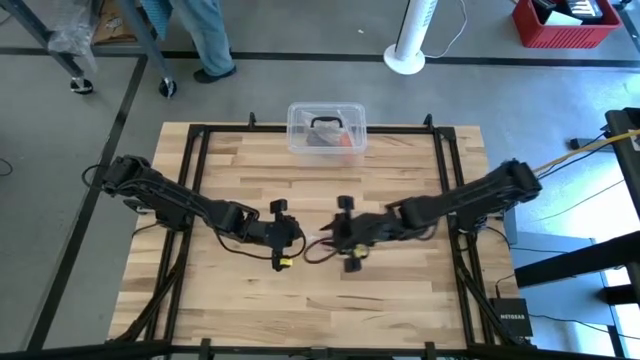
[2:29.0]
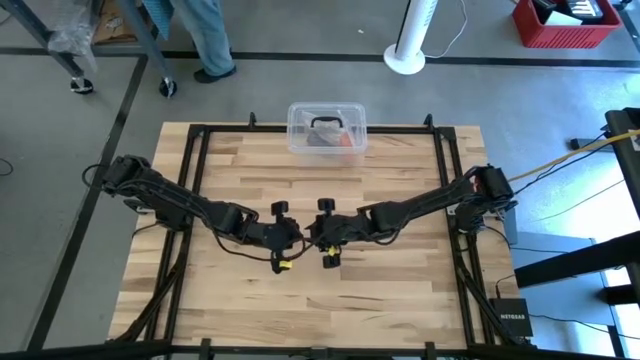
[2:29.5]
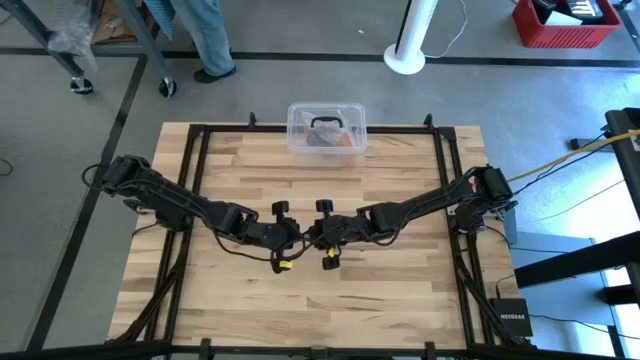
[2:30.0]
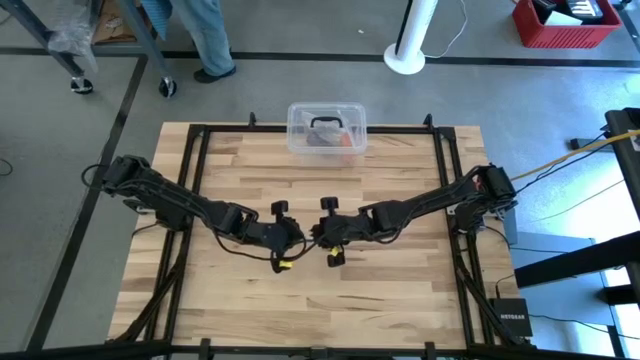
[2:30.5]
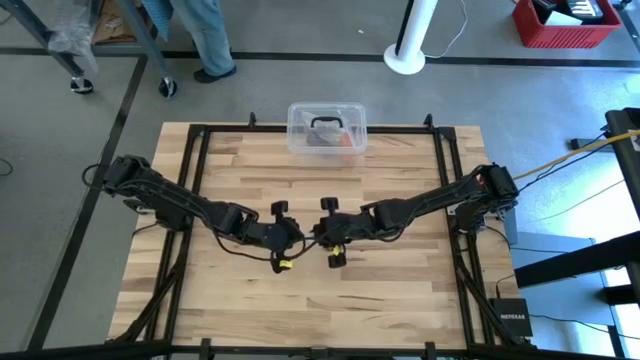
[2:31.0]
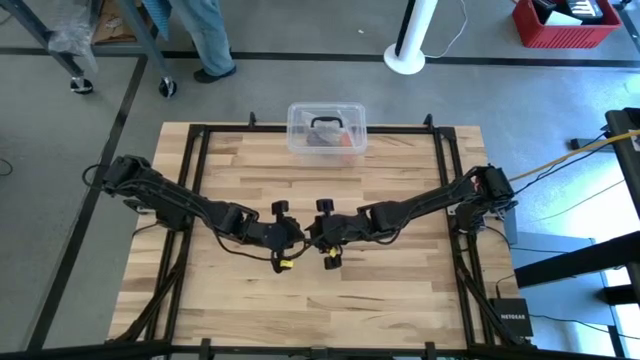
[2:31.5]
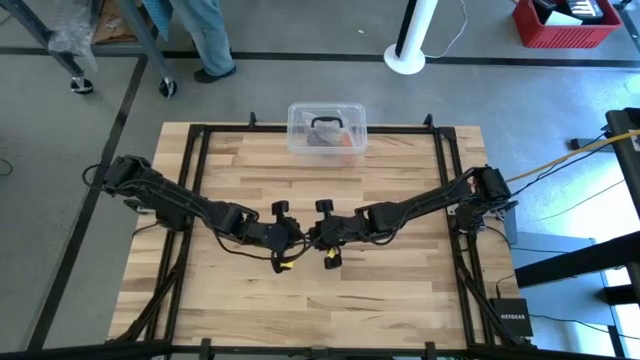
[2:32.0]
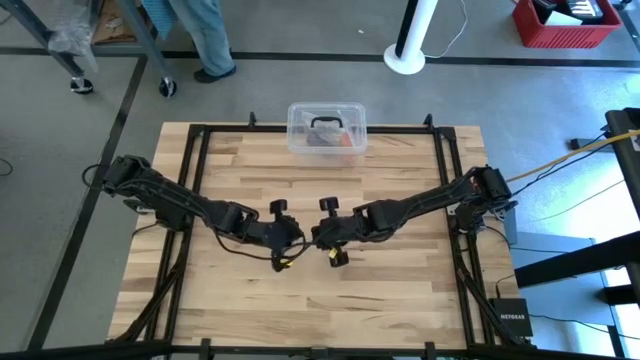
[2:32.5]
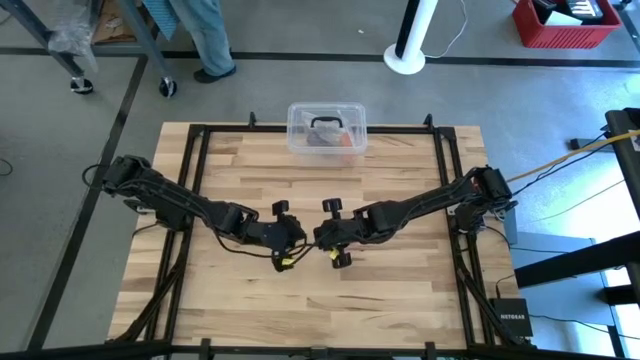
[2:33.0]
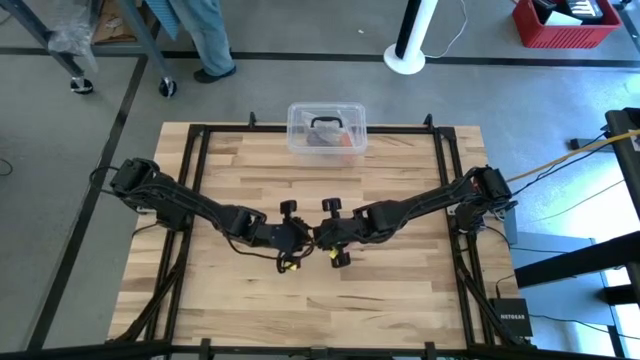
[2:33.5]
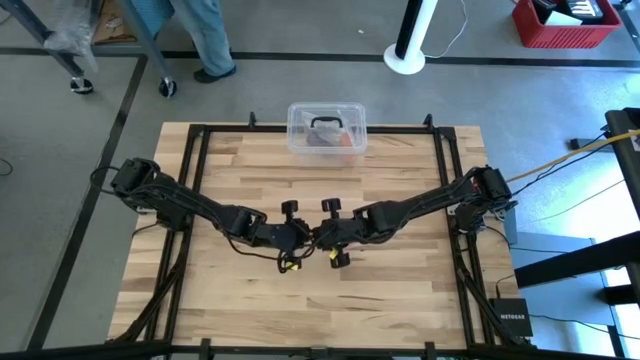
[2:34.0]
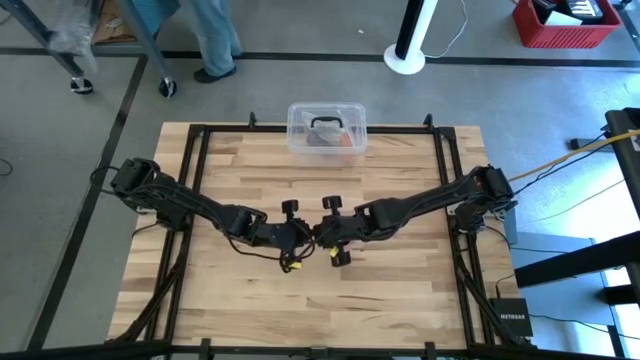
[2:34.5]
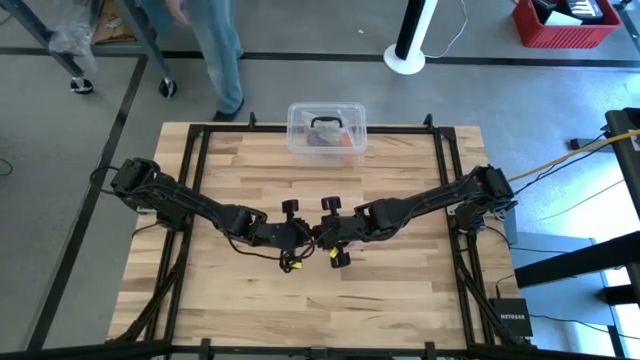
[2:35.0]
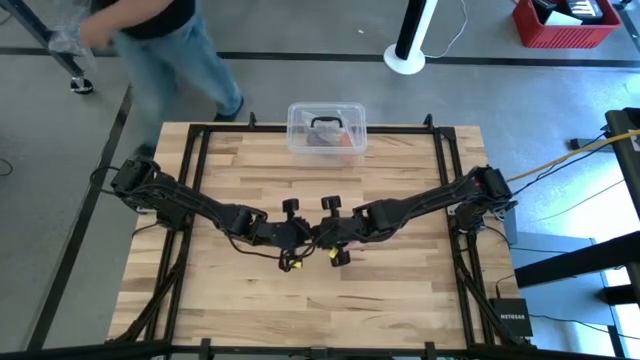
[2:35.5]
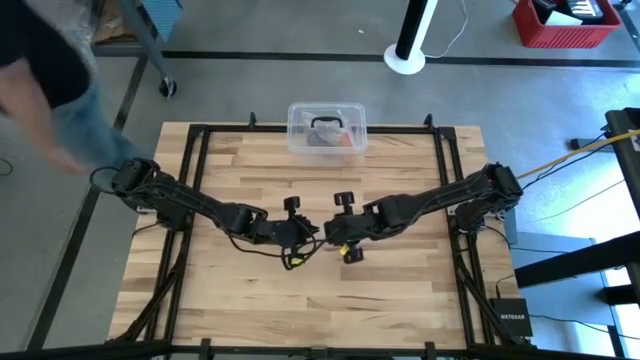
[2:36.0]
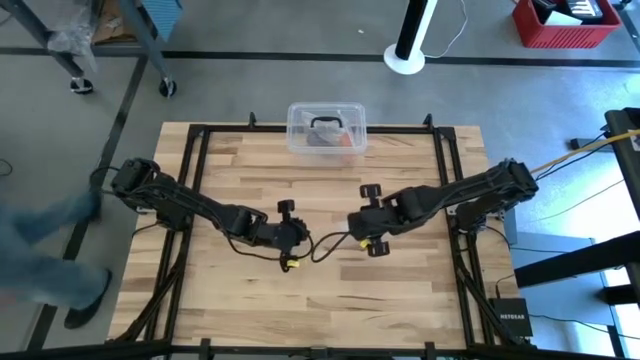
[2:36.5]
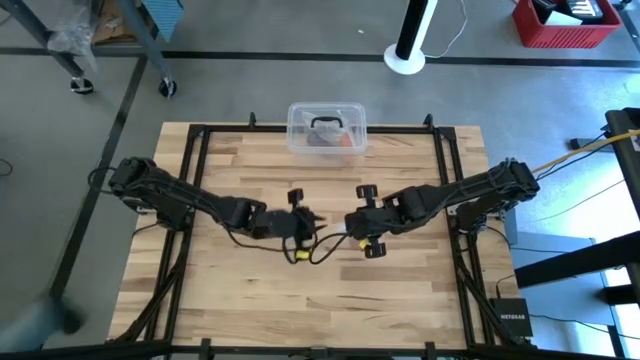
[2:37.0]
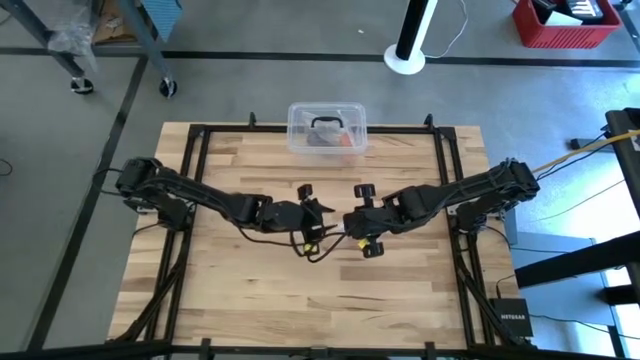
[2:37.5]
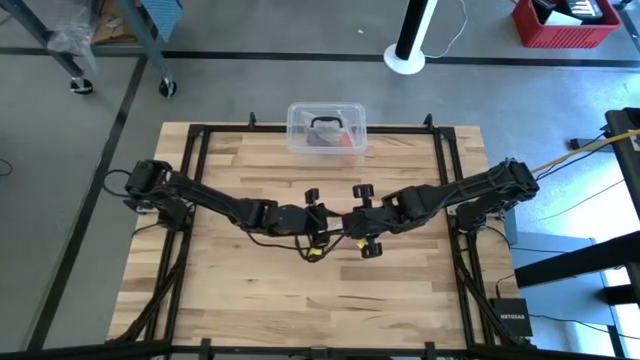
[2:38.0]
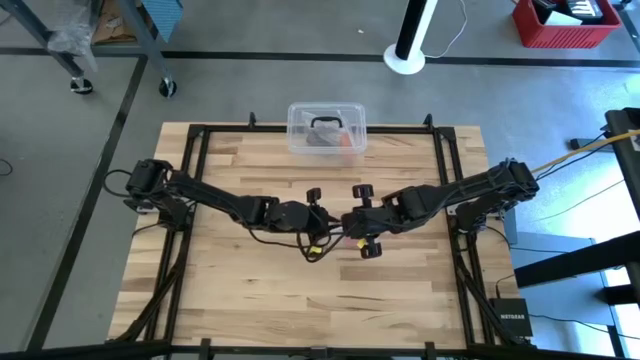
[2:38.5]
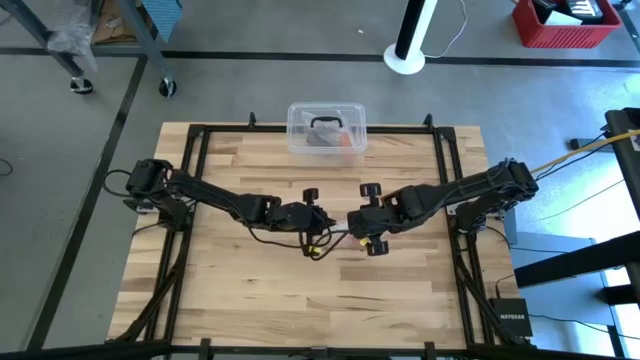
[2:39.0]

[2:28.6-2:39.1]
Task: Roll bandage
Close the transparent zip lock bag

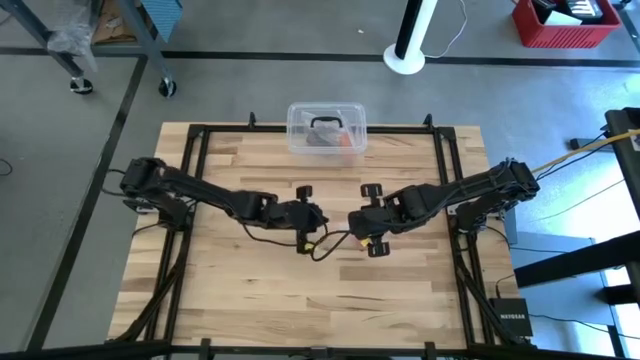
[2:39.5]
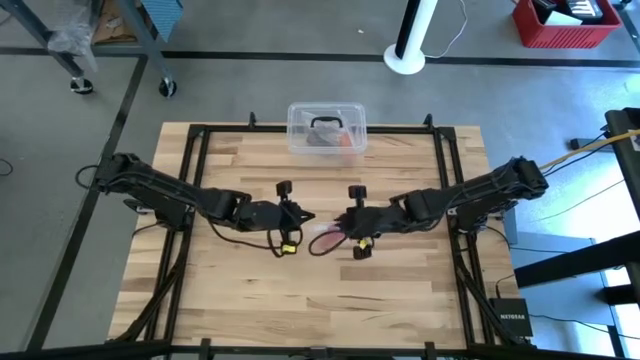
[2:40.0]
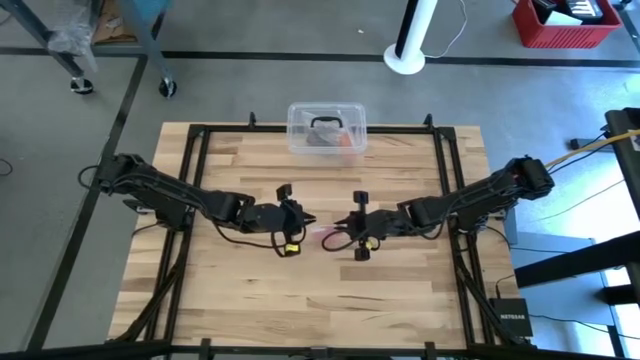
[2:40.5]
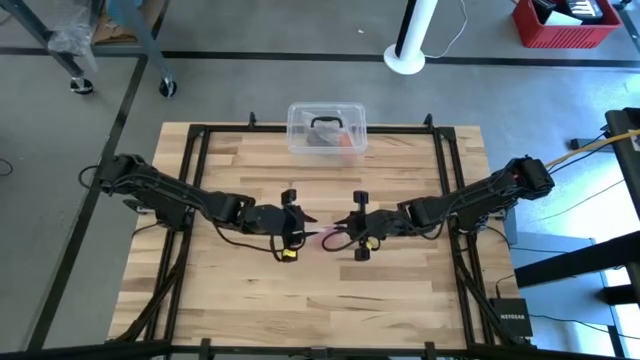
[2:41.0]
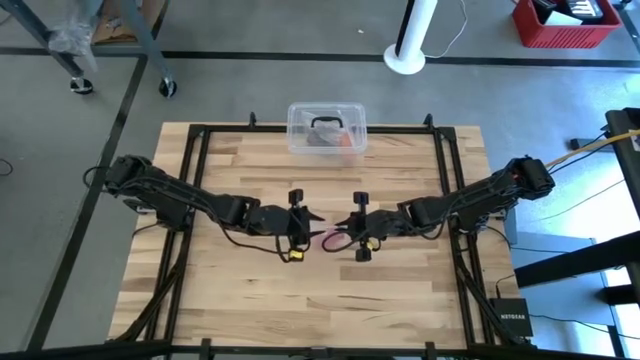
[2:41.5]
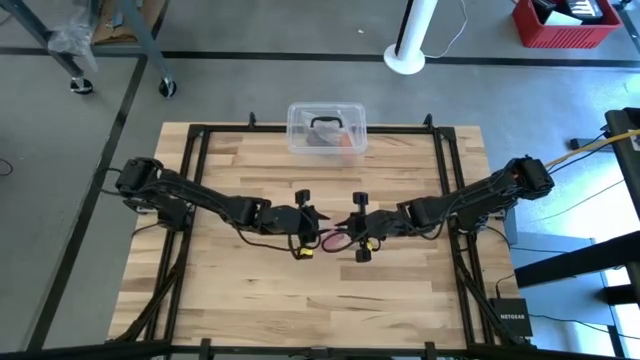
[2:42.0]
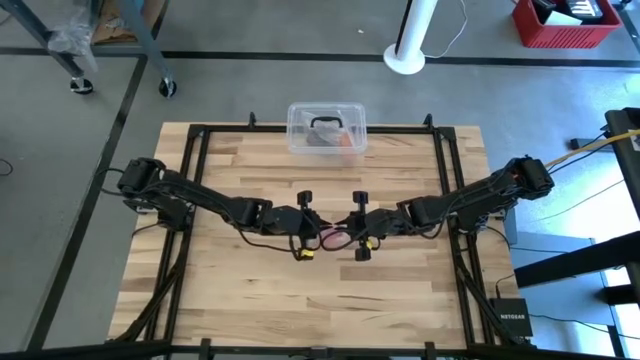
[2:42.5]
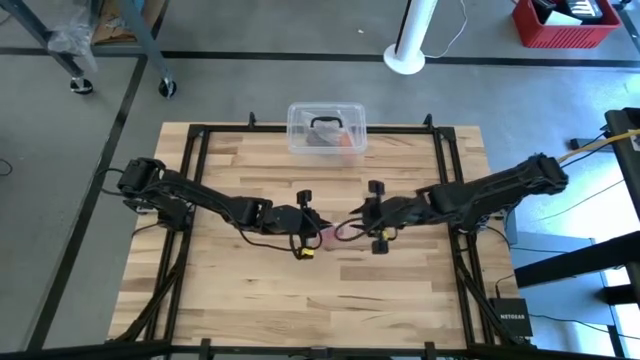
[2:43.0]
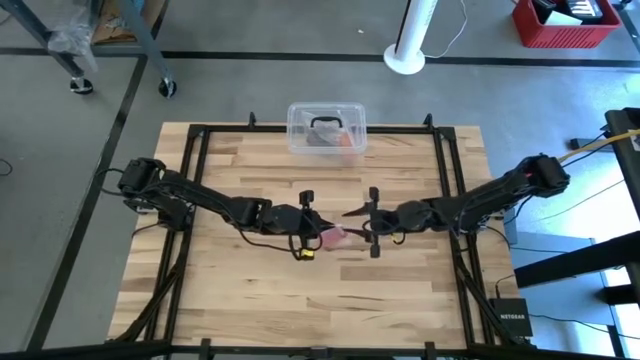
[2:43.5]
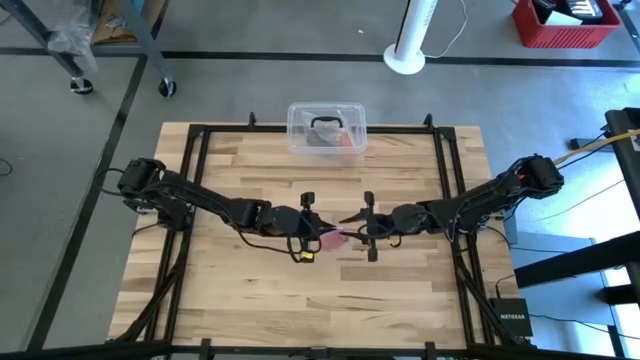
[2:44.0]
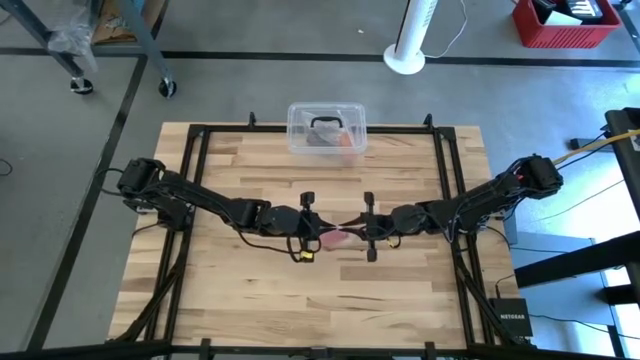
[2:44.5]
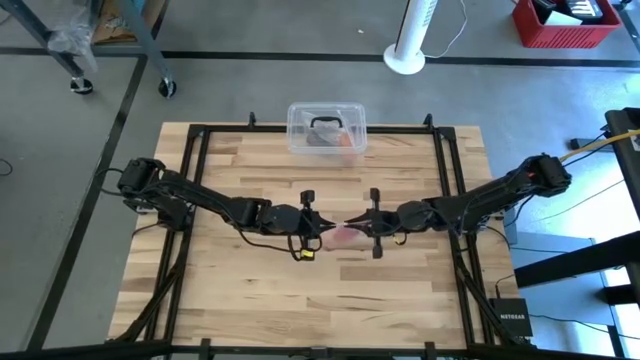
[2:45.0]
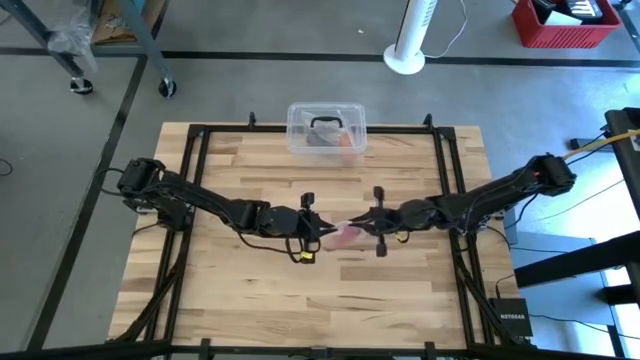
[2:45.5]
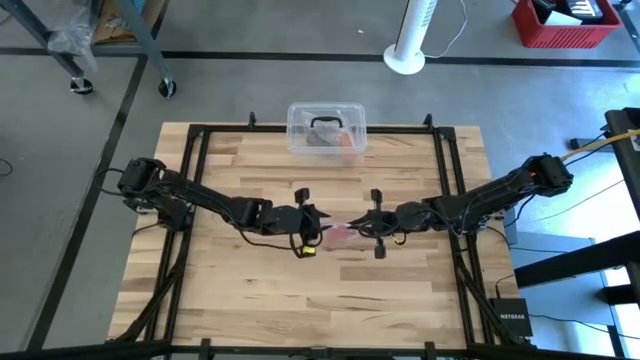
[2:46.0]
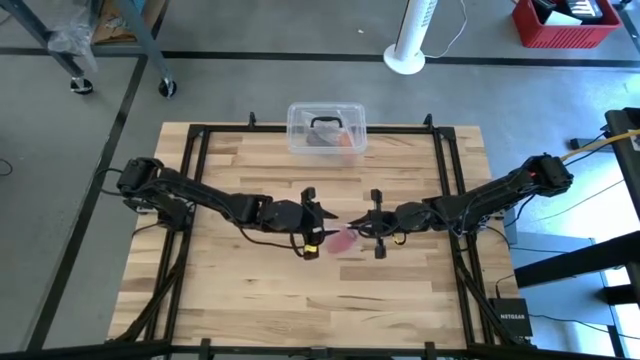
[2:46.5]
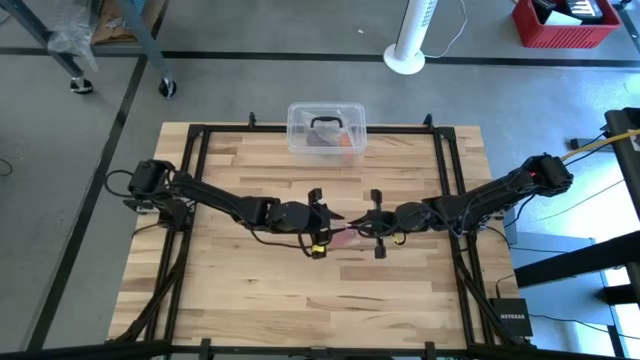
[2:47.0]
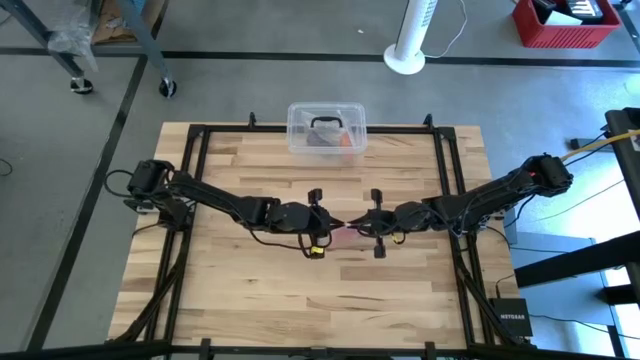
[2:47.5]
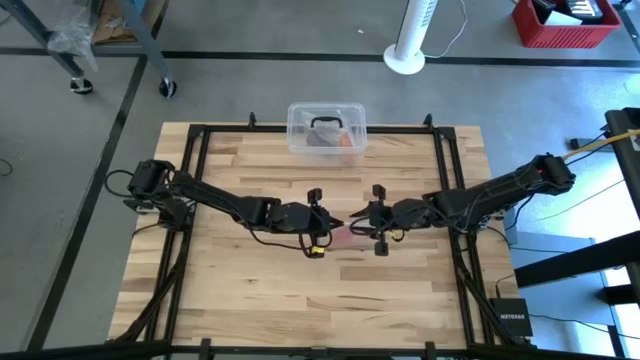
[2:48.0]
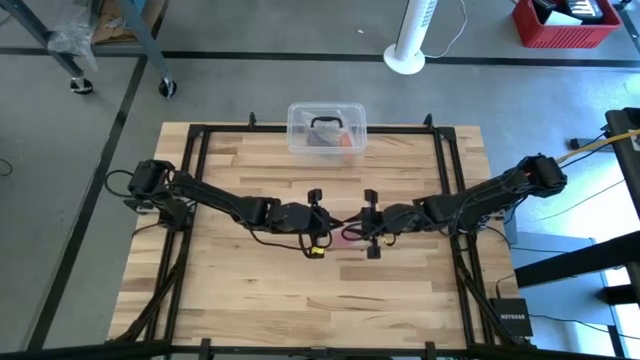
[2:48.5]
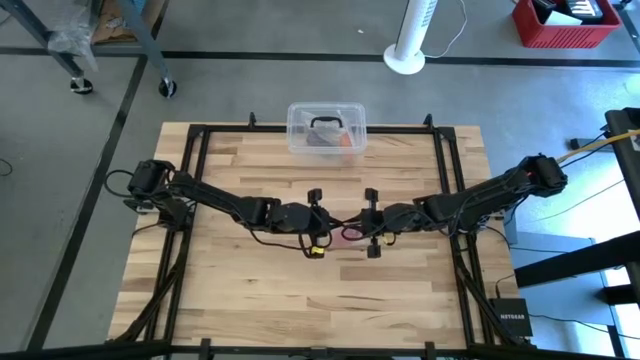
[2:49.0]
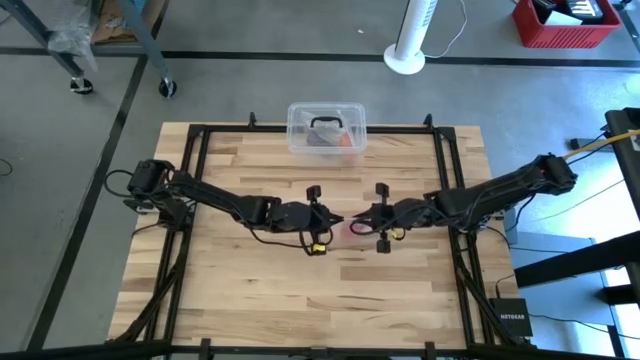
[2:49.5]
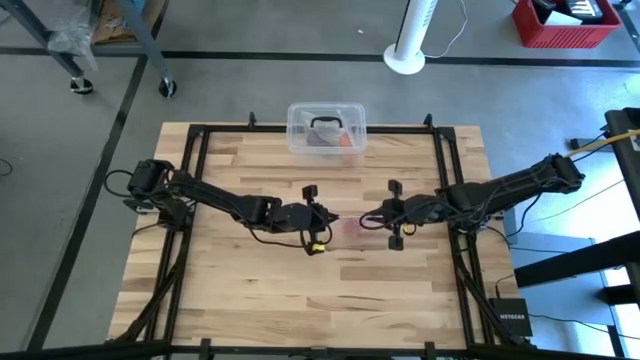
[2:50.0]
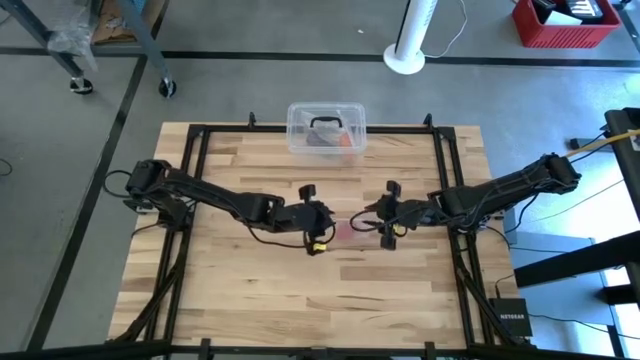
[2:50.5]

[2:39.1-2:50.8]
Close the transparent zip lock bag
